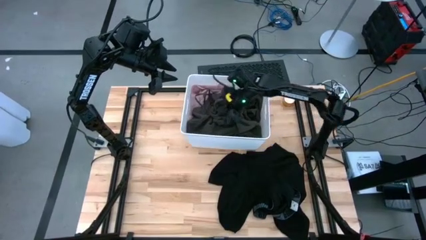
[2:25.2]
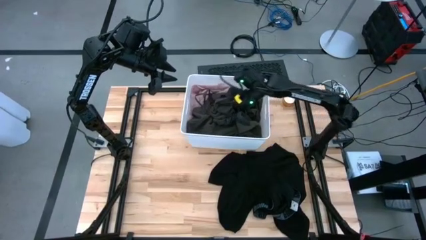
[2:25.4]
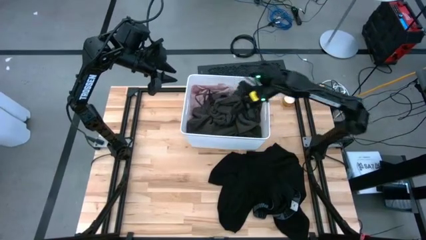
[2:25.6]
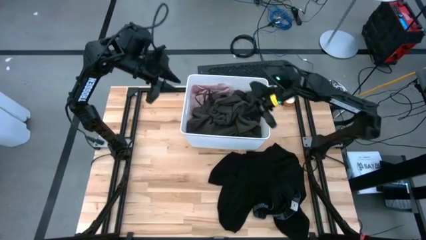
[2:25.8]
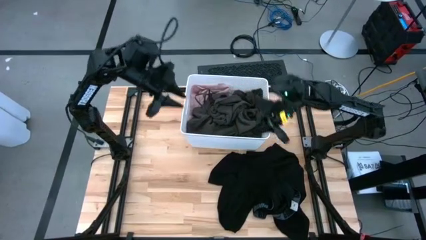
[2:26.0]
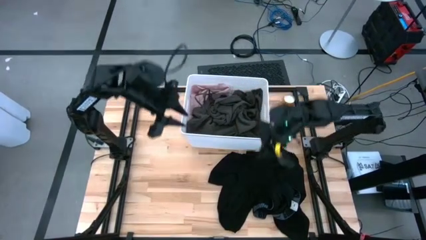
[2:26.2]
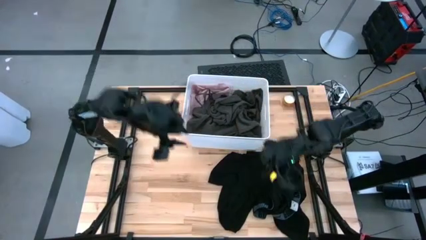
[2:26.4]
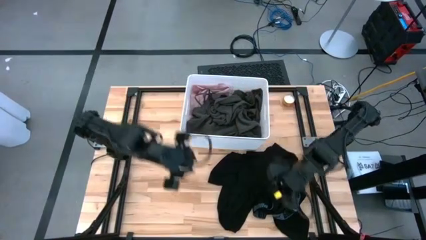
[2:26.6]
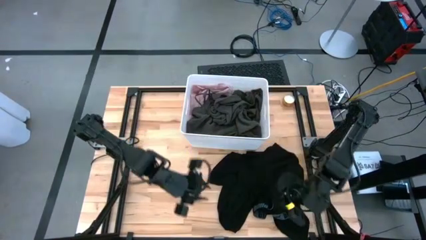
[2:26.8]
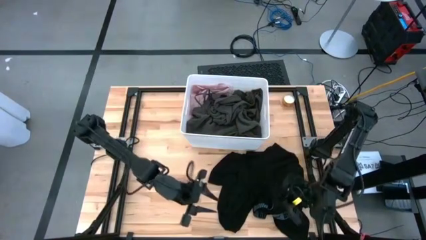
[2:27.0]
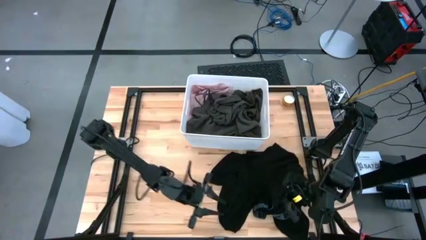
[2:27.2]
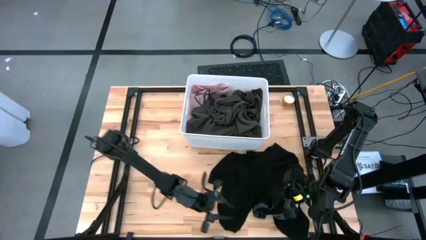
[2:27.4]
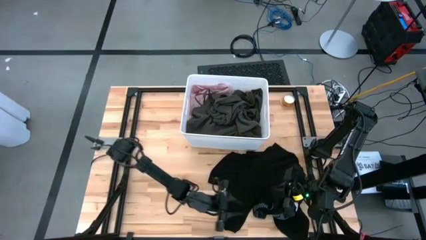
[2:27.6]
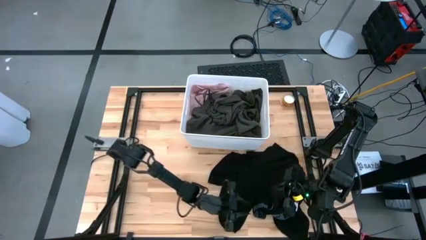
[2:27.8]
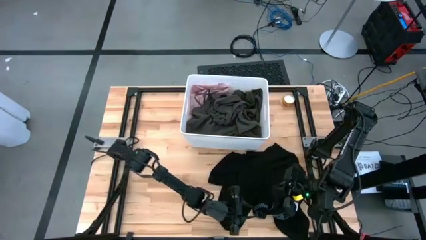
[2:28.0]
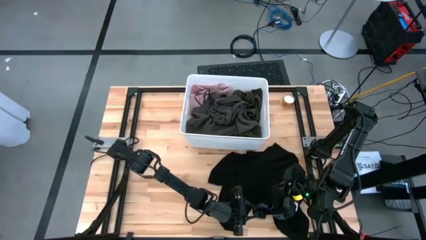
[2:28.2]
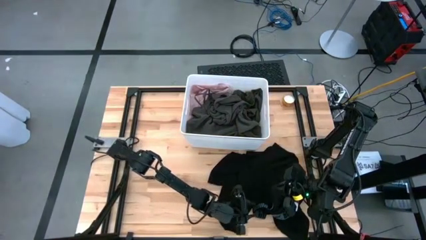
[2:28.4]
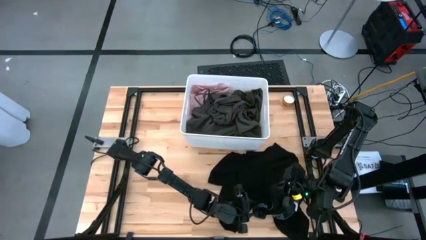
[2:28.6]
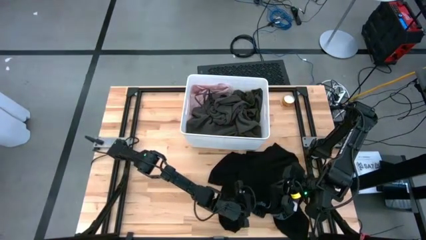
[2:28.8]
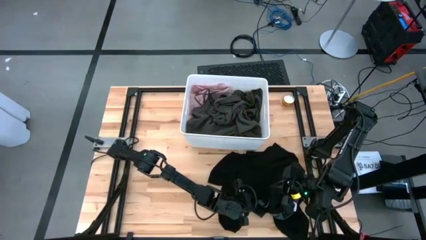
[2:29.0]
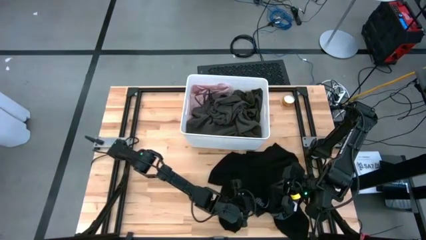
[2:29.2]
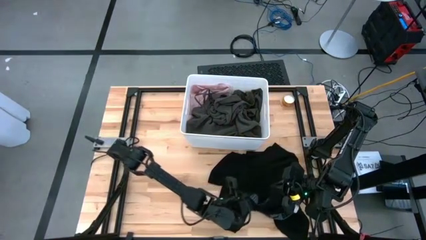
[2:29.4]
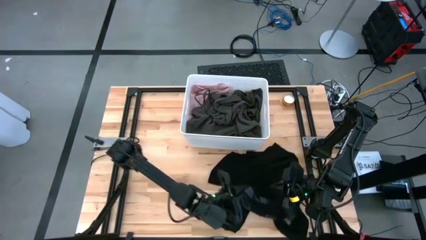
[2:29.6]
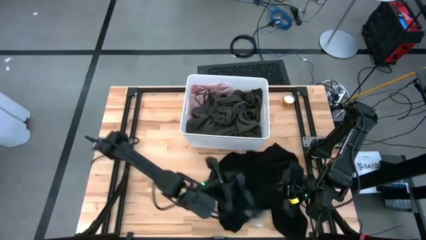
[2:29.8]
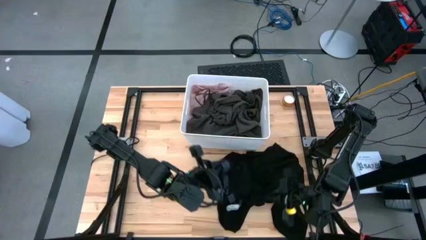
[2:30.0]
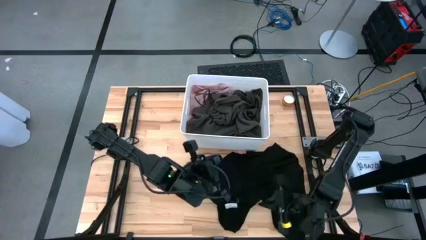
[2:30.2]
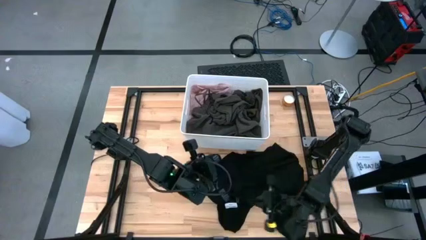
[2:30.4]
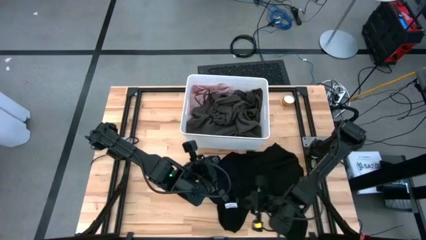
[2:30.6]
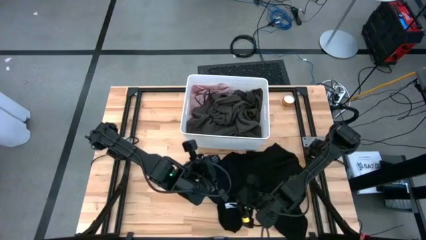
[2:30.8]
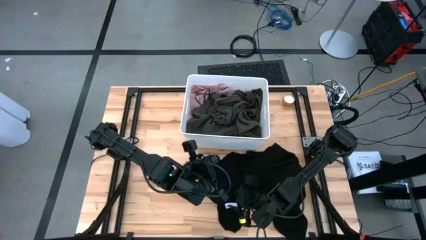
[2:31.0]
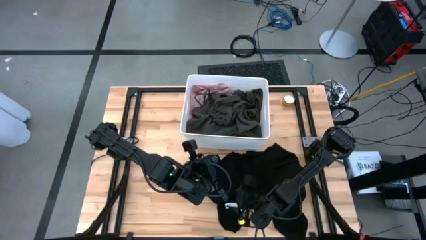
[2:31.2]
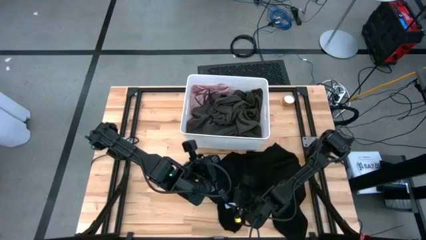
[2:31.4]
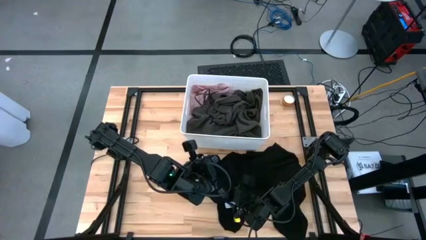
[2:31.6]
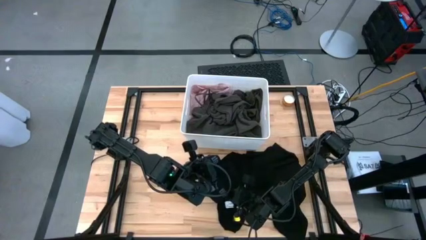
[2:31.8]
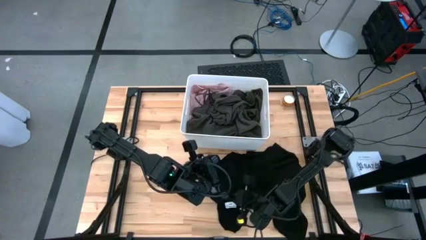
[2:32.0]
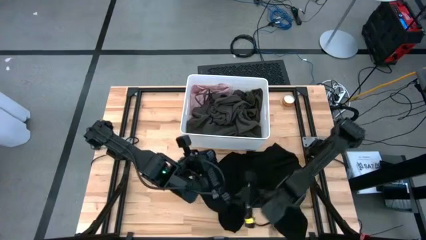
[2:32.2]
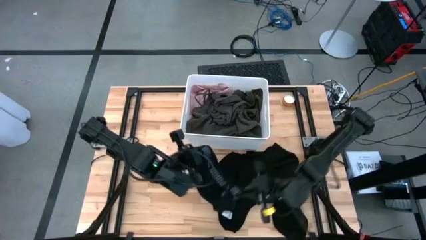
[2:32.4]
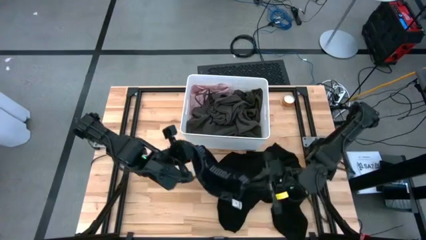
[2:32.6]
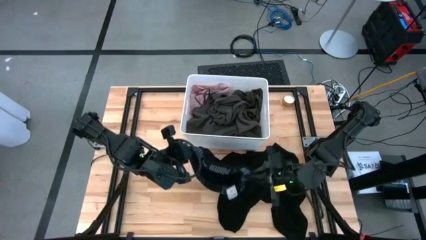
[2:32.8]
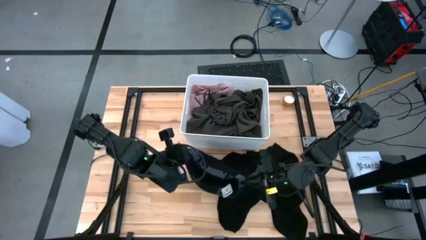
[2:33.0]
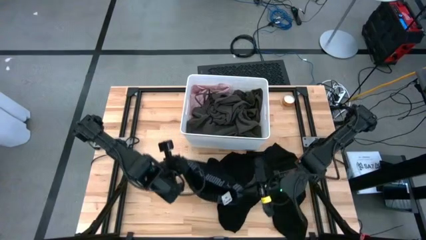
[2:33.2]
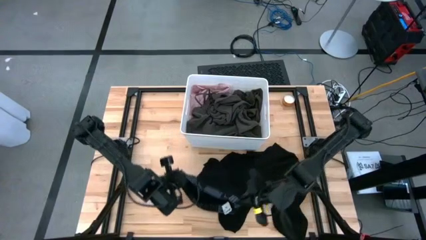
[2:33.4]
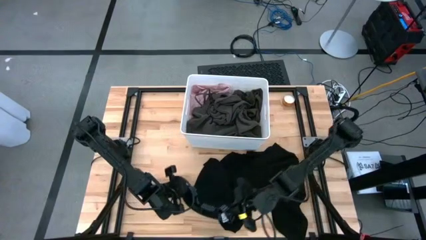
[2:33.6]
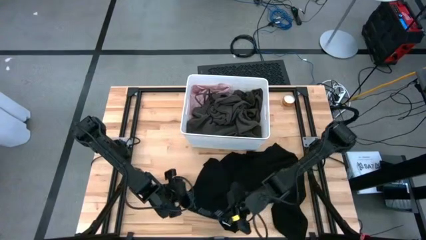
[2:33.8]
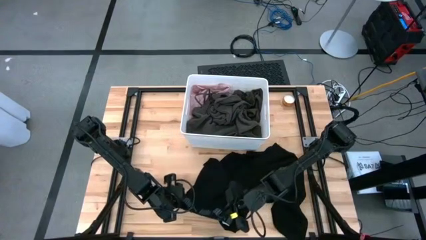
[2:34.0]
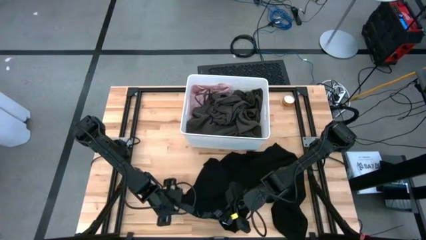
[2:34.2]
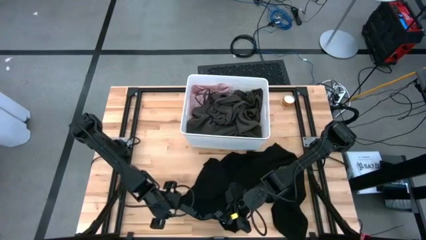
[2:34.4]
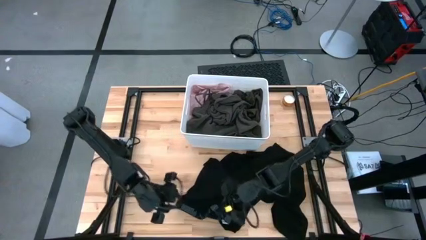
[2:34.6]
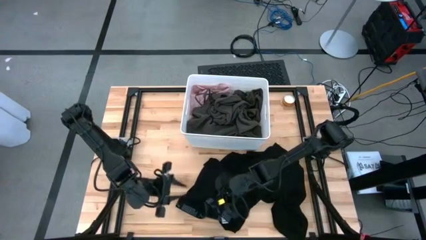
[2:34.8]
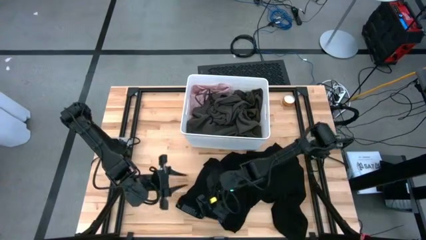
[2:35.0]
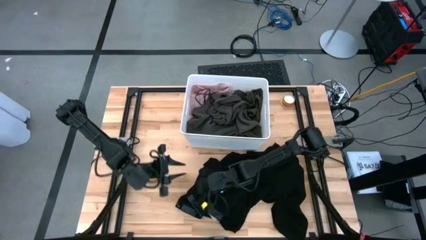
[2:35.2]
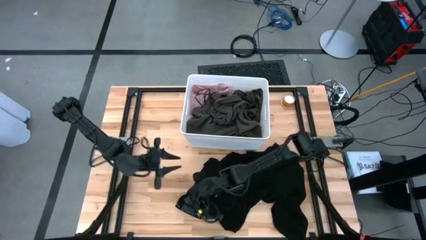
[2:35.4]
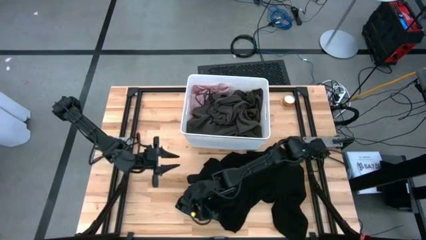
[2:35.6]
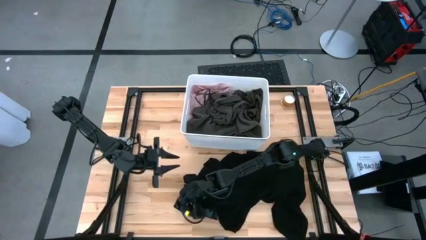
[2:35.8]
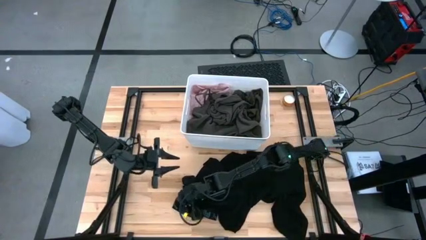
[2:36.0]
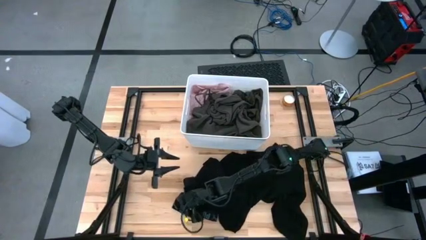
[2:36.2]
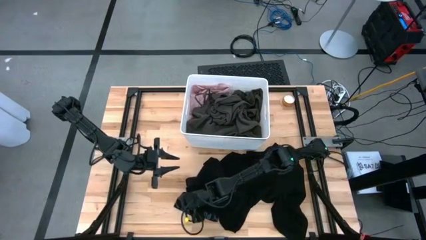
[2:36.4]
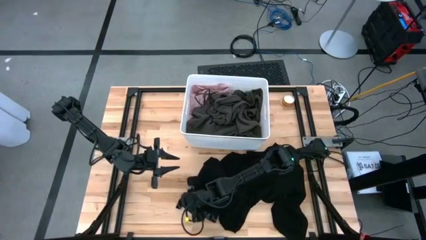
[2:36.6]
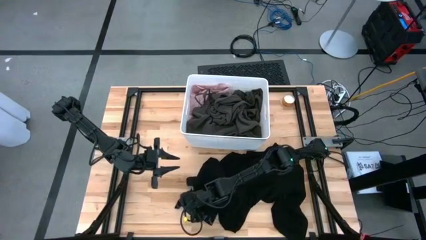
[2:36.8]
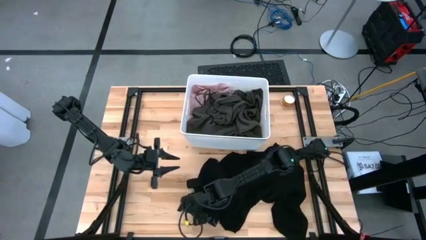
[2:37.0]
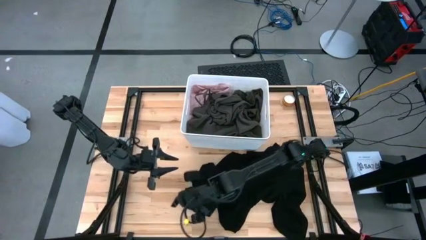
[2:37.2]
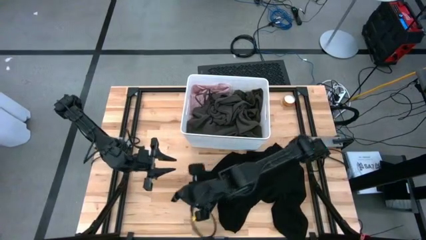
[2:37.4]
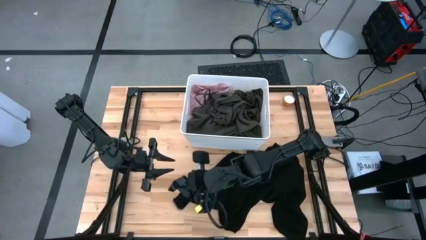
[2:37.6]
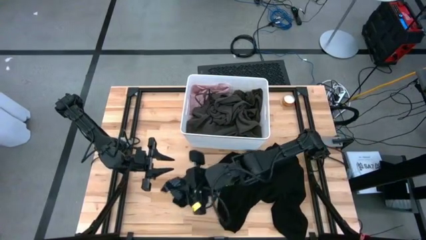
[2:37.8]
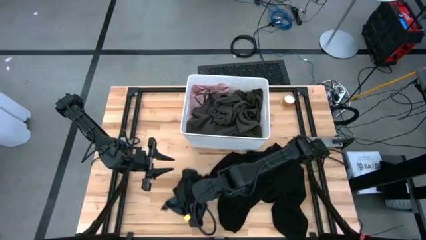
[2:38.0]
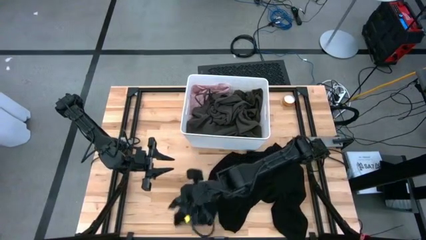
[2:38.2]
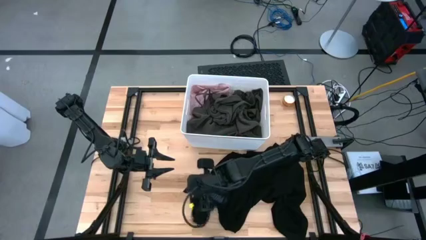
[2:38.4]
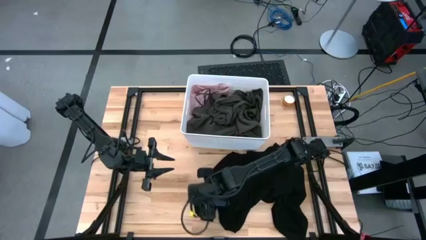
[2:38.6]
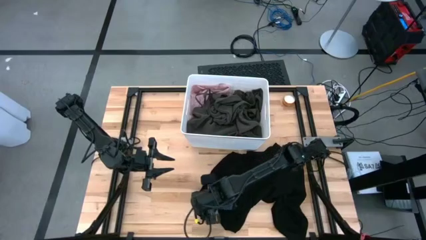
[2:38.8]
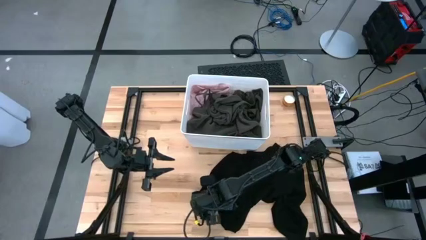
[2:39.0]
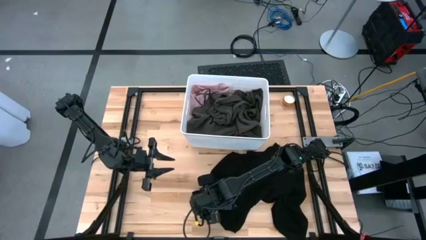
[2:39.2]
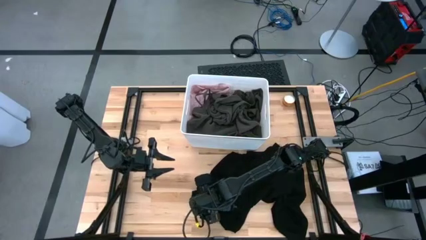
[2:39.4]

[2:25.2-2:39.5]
Task: Sort clothes
Fold the black underwear

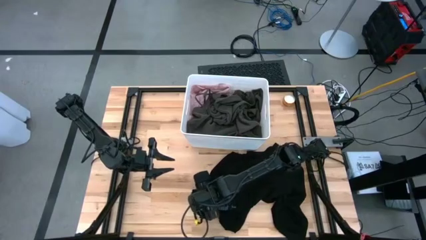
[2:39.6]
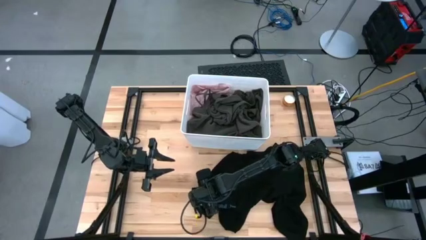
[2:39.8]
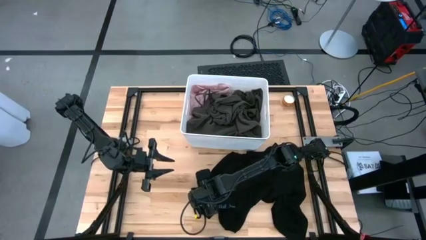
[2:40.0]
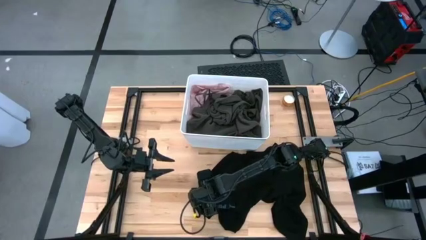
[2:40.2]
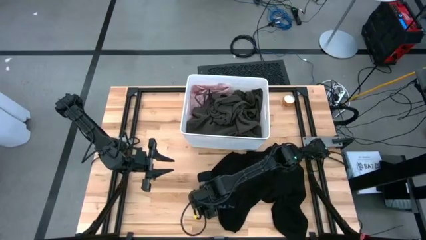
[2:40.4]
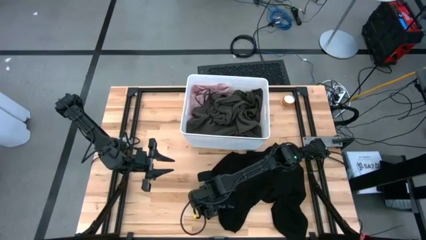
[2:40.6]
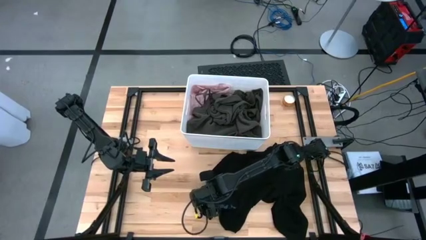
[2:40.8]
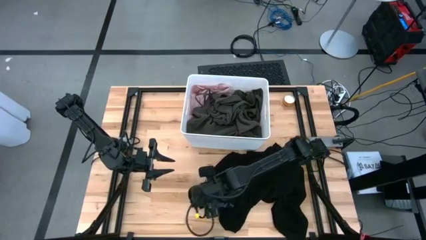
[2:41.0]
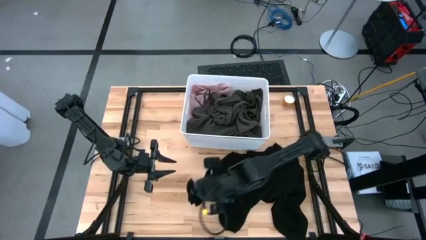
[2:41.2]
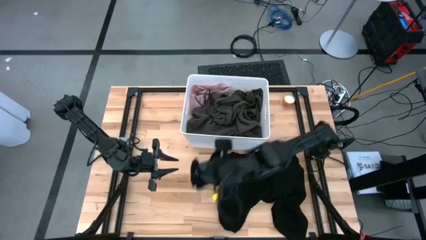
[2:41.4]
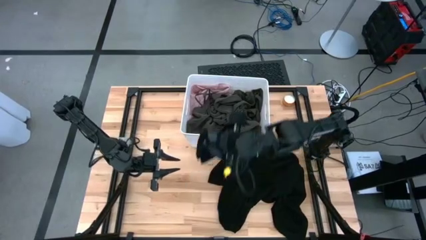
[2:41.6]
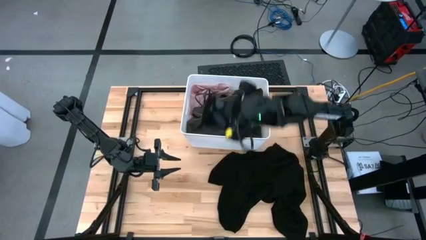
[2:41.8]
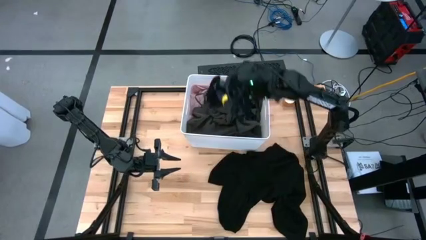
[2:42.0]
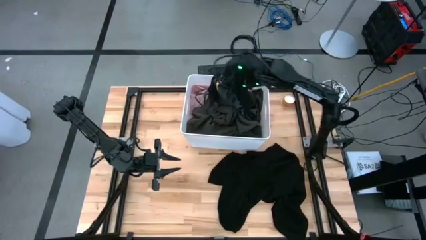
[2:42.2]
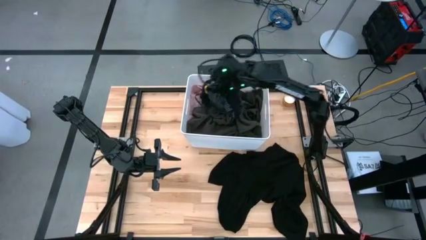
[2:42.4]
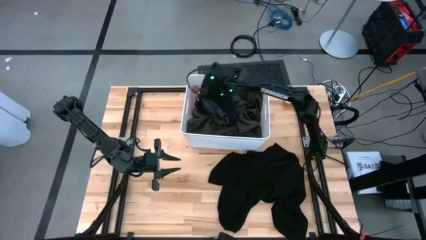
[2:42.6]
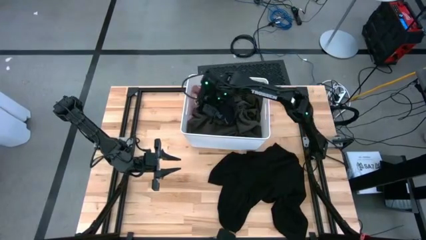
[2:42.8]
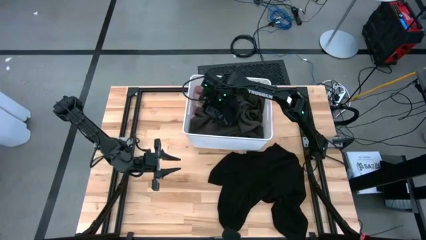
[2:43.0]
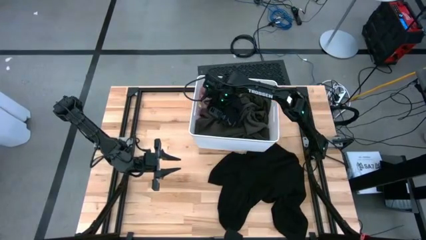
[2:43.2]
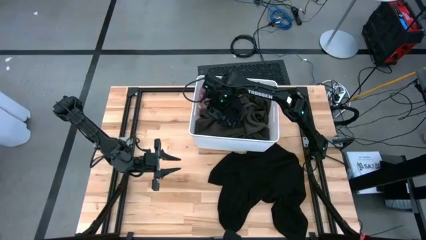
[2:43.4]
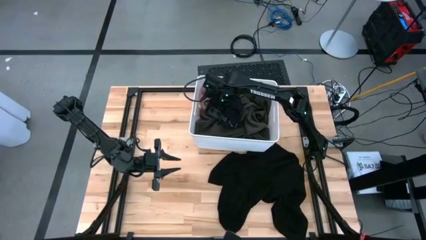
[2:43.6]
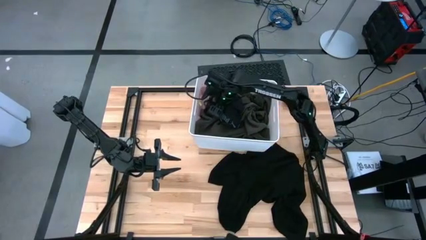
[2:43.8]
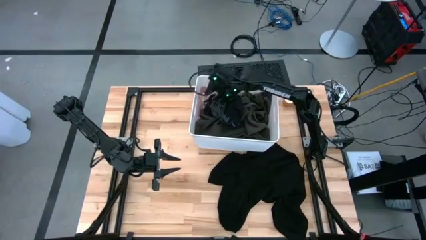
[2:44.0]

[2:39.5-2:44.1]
Put the black underwear into the laundry organizer bin
